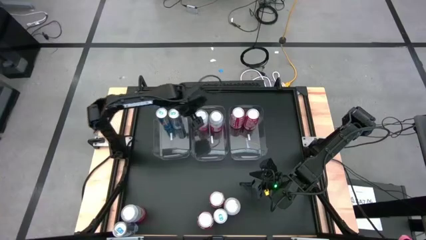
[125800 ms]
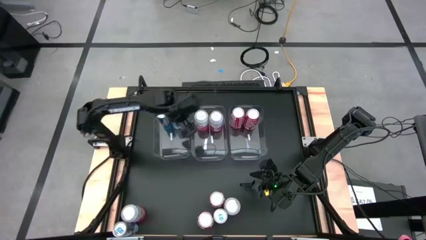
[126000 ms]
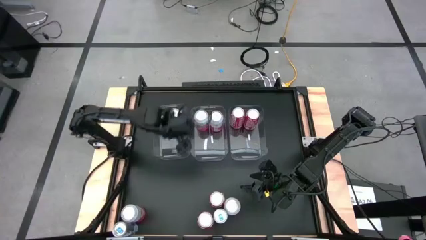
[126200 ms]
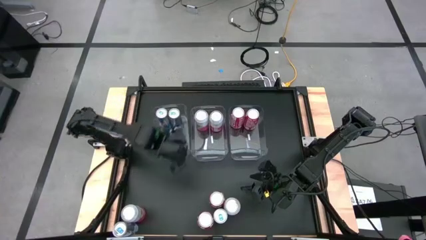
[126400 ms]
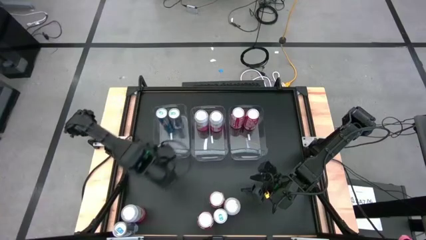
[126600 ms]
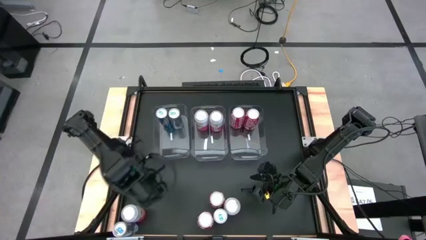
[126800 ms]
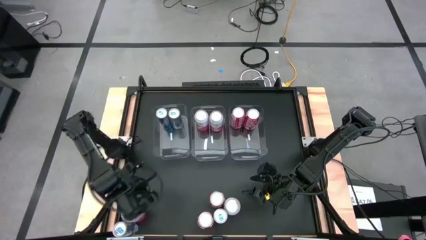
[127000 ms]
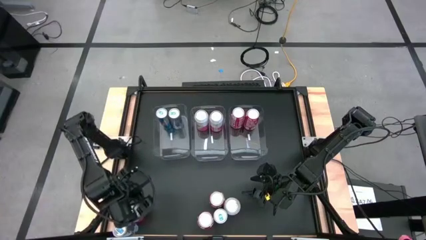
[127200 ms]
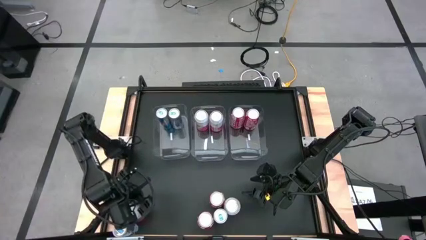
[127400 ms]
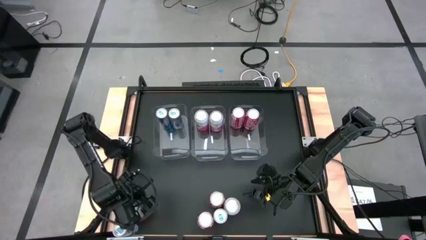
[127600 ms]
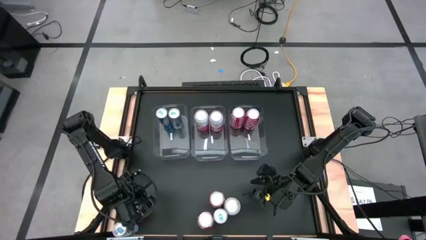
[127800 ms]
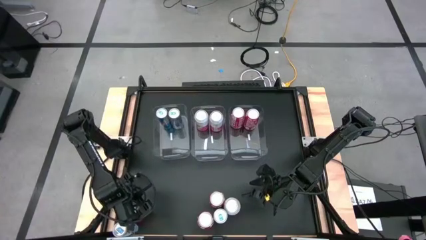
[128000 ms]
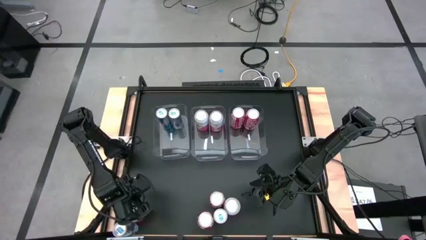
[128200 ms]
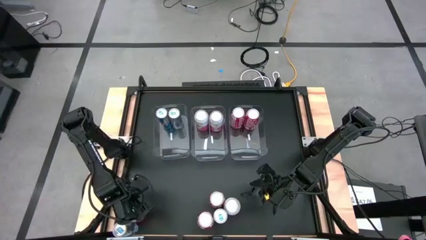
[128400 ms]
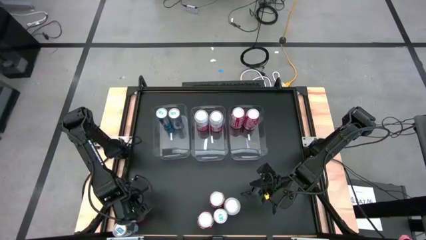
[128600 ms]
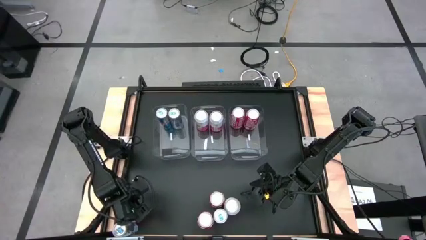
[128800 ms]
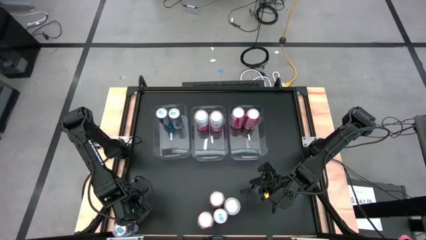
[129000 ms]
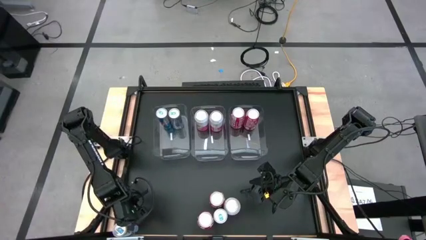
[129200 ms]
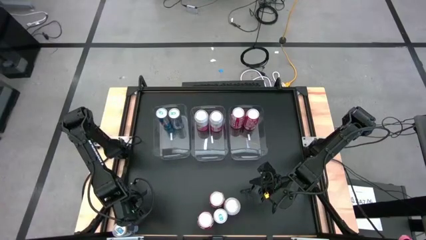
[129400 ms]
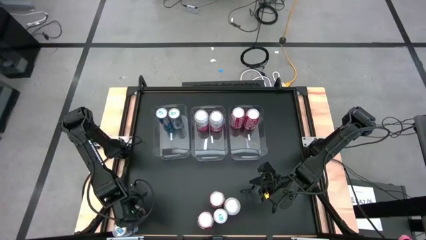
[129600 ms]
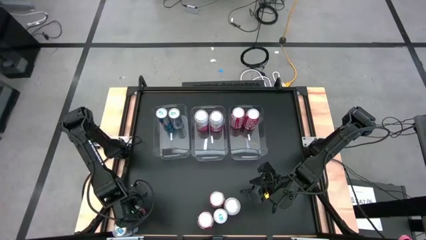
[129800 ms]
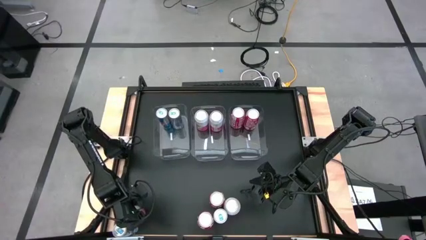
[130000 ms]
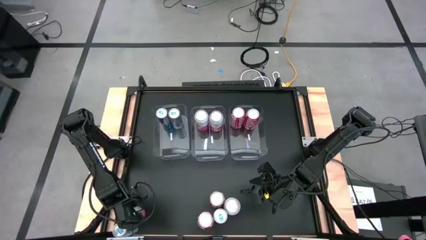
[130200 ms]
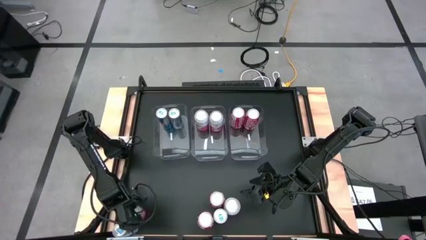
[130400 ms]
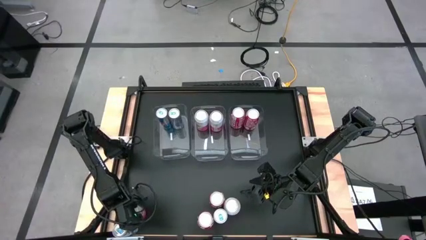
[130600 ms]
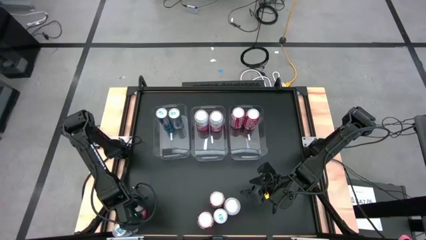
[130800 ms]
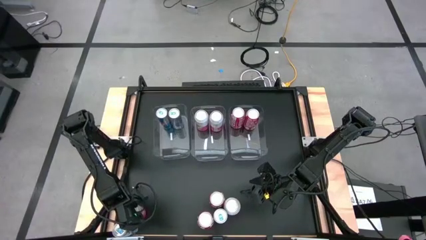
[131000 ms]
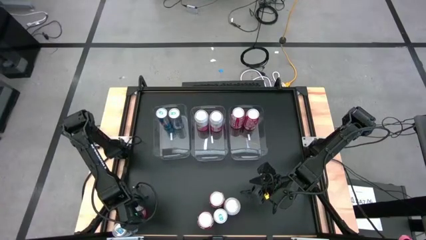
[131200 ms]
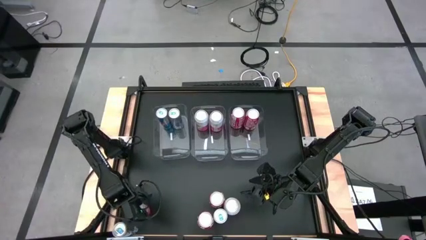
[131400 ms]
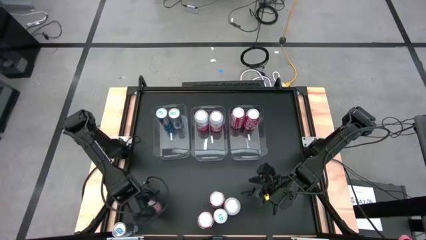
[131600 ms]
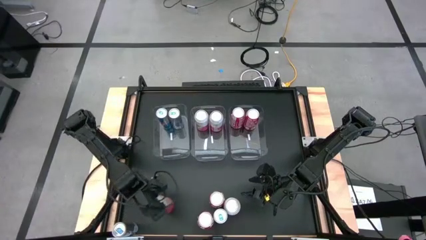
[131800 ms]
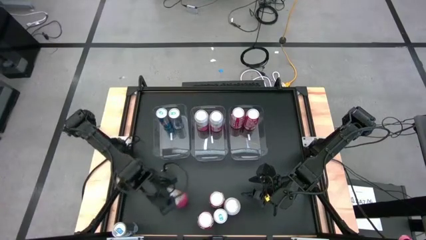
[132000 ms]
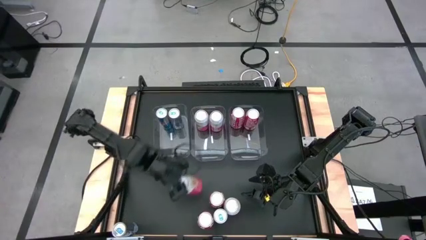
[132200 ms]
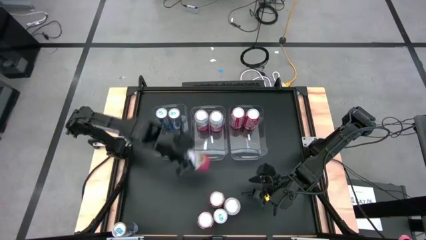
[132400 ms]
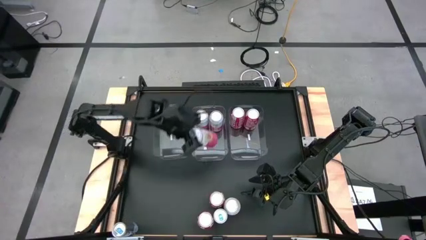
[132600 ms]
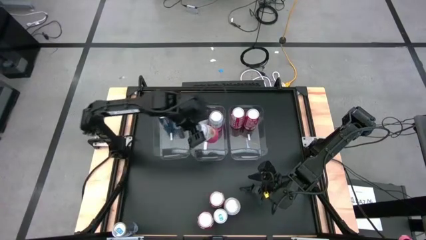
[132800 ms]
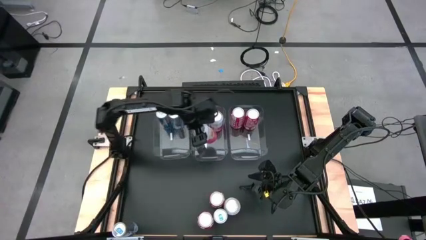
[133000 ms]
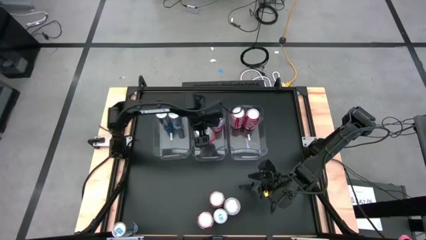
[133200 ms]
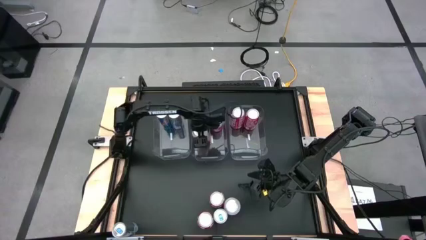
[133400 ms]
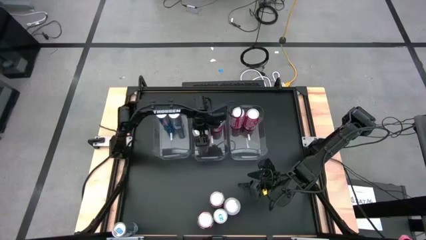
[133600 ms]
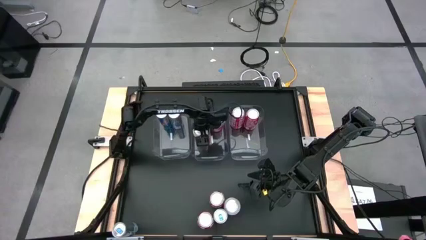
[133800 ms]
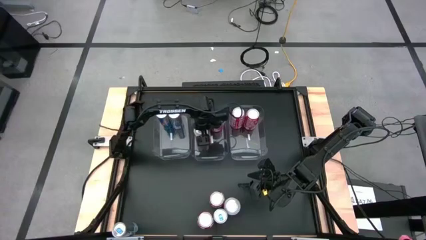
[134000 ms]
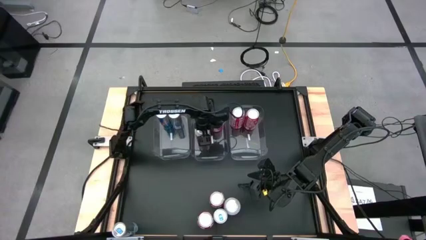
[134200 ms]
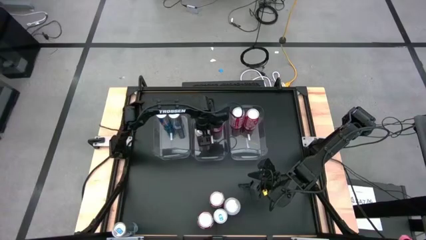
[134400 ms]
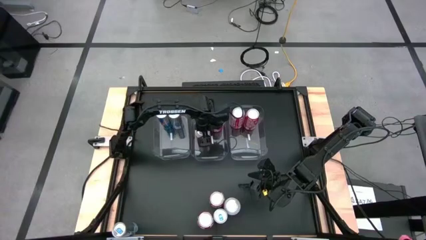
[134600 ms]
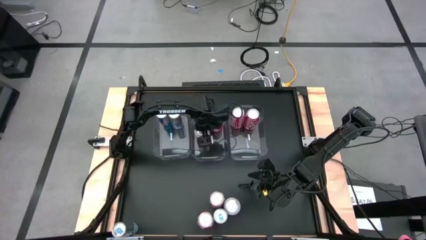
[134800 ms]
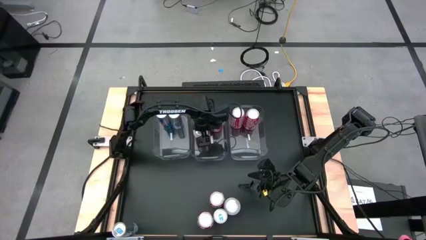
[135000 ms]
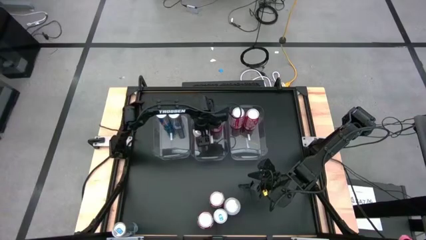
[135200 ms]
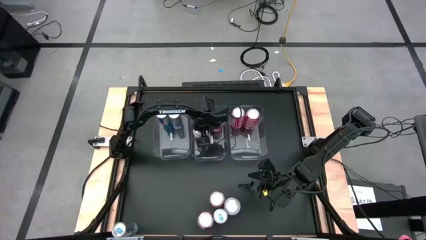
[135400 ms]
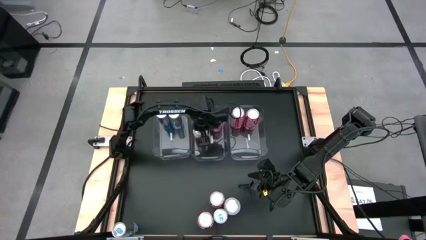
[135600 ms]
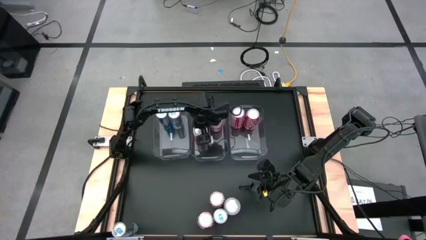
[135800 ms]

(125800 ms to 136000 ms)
Task: Sort soda cans
Put the pink-white soda can into the middle transparent bin

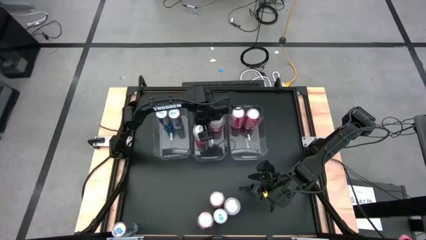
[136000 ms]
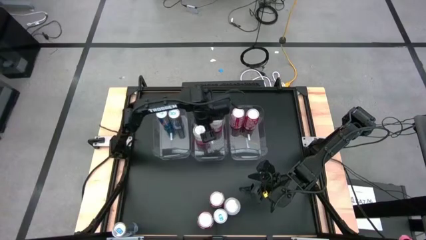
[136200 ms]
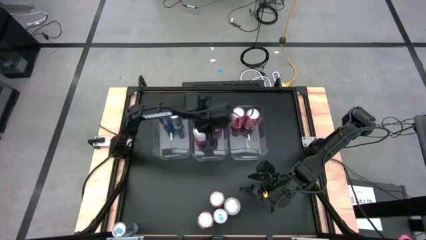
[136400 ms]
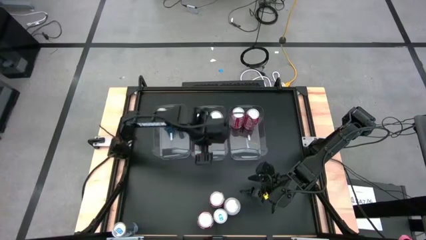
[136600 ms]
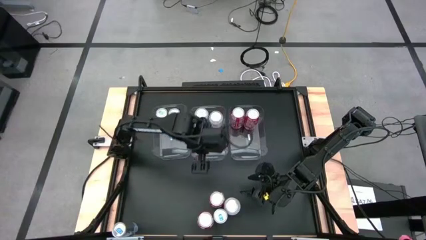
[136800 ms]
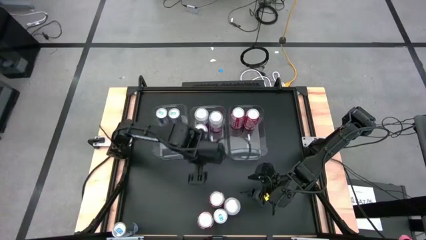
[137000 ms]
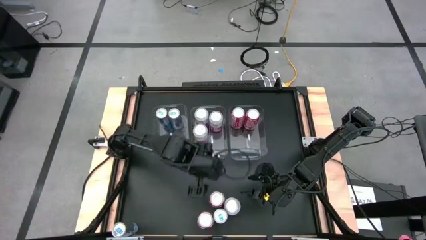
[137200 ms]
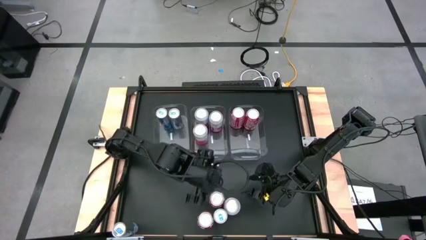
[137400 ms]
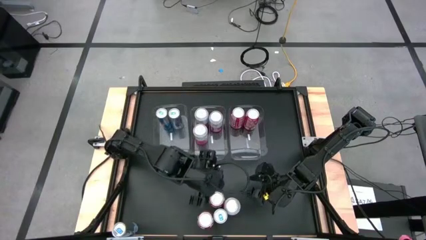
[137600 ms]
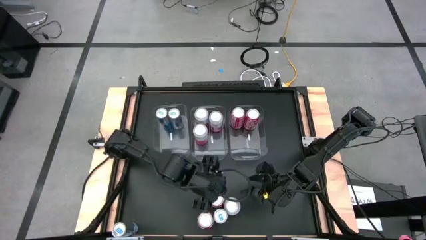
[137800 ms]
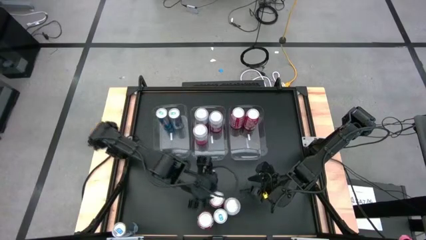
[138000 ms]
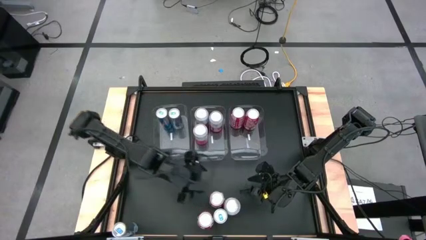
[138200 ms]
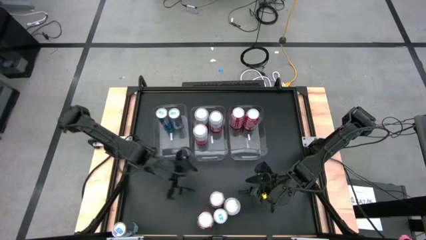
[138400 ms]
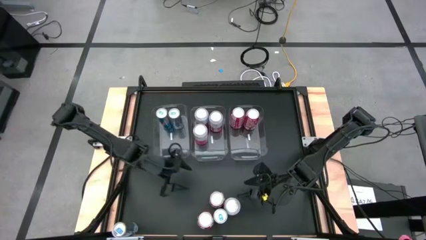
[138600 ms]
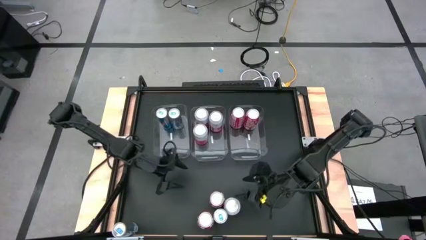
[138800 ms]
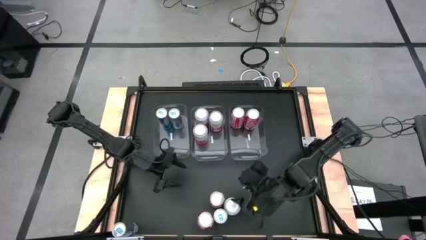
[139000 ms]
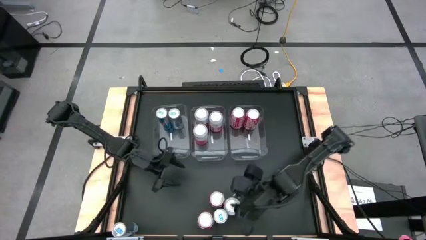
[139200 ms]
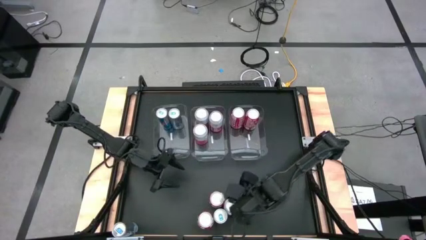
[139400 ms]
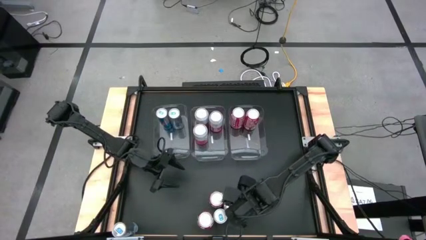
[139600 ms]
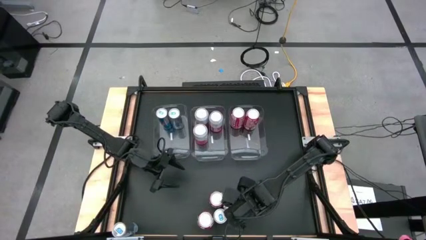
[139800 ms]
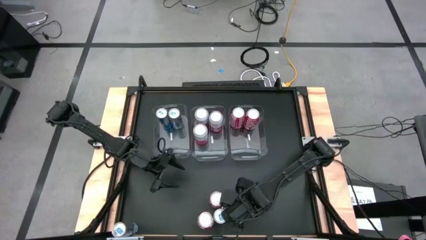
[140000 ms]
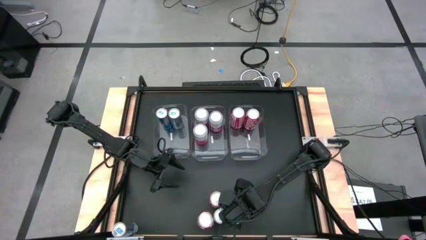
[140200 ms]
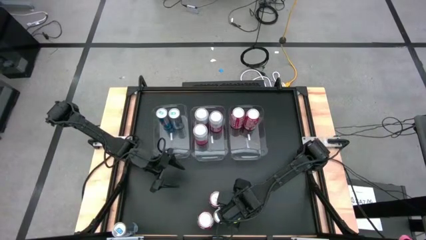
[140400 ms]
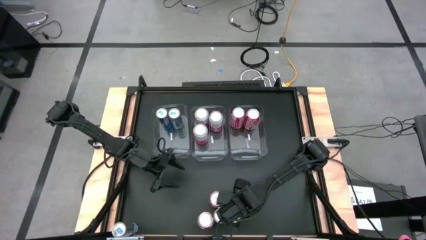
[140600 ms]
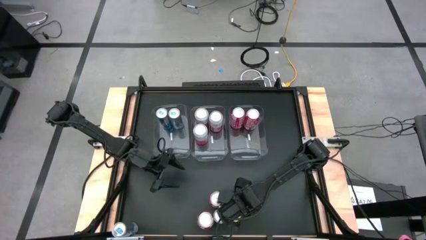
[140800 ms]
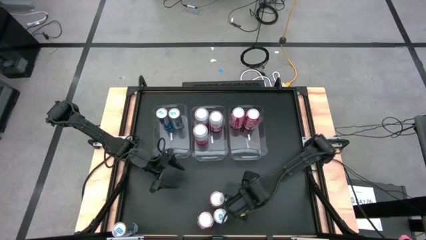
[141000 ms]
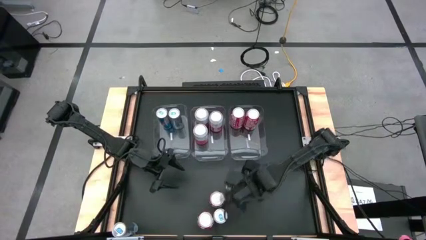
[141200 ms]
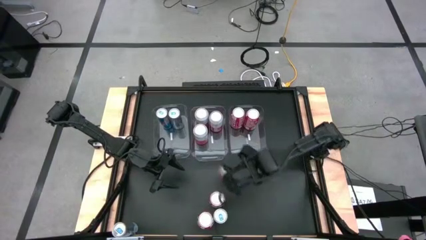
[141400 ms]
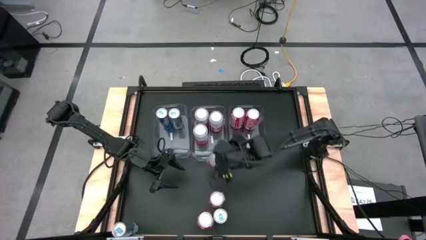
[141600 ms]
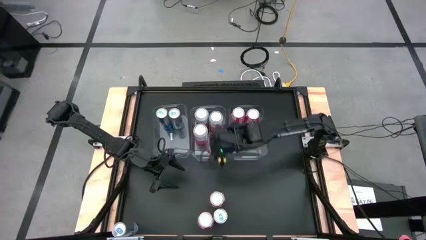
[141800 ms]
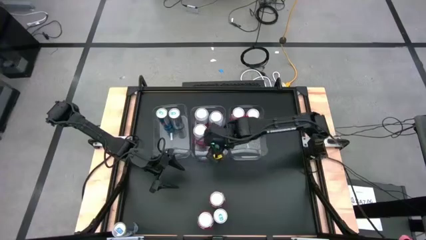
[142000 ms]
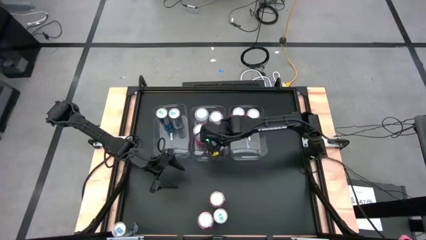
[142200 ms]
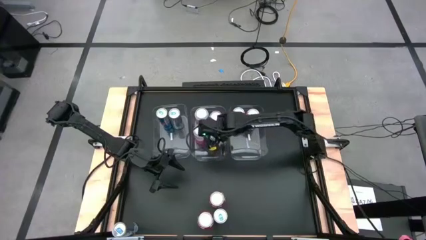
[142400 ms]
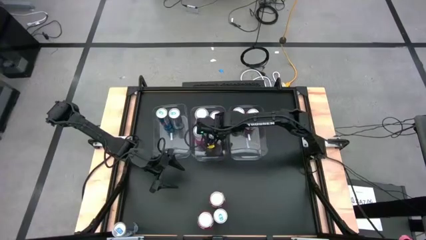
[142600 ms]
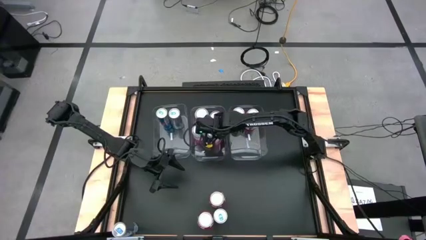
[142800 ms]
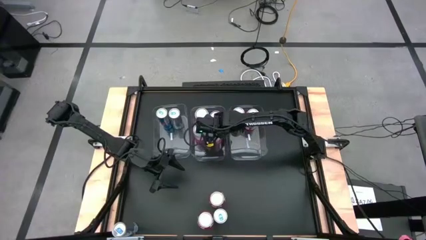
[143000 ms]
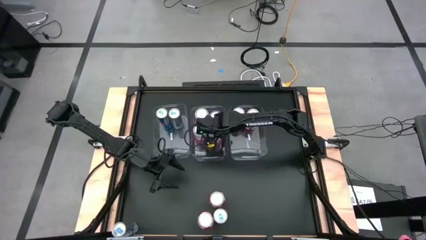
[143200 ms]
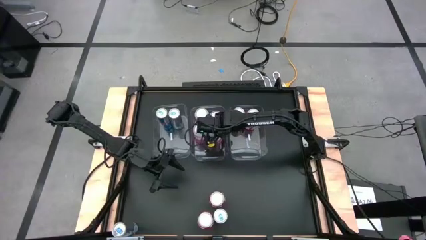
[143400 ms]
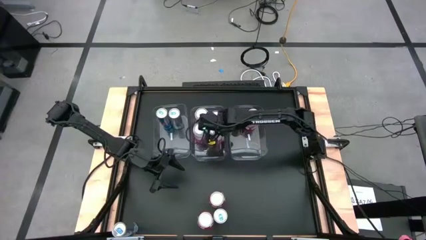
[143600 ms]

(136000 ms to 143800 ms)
Put the pink-white soda can into the middle transparent bin
